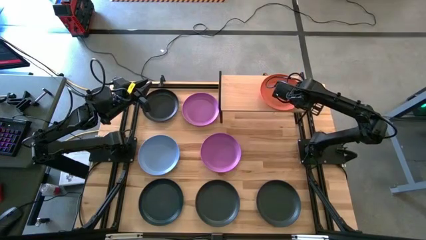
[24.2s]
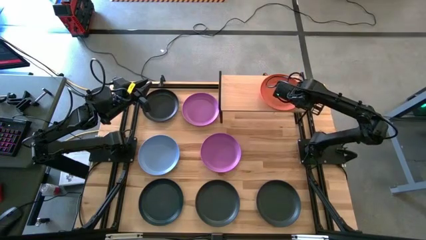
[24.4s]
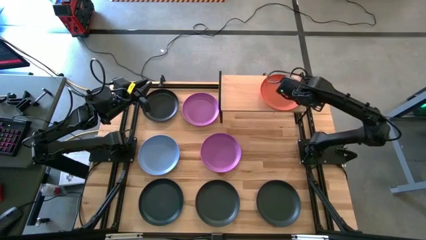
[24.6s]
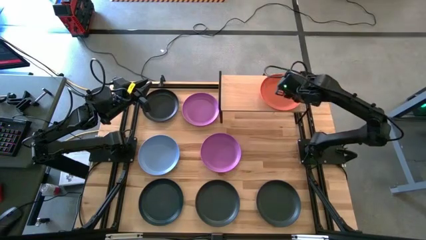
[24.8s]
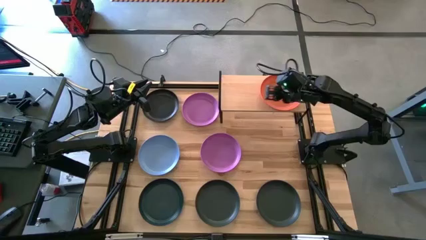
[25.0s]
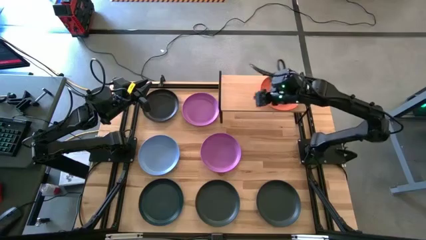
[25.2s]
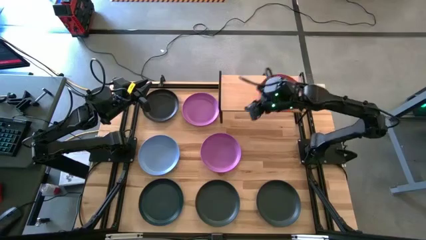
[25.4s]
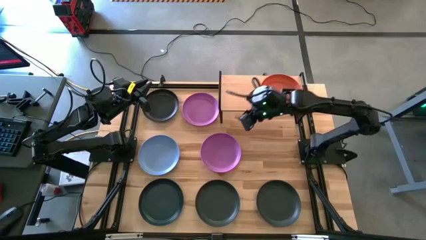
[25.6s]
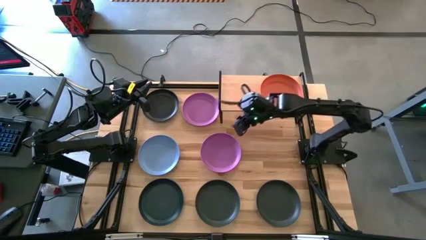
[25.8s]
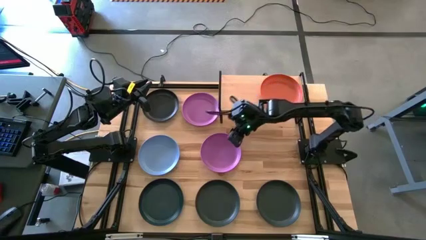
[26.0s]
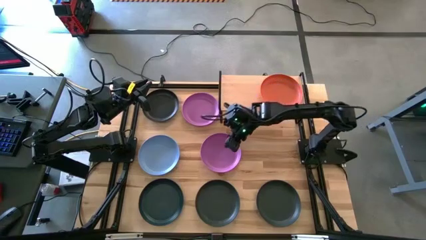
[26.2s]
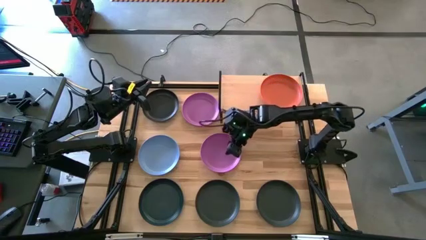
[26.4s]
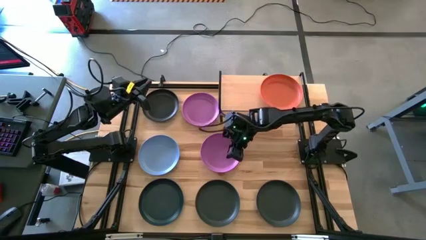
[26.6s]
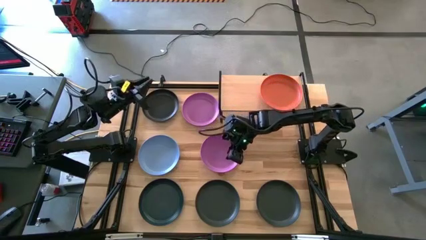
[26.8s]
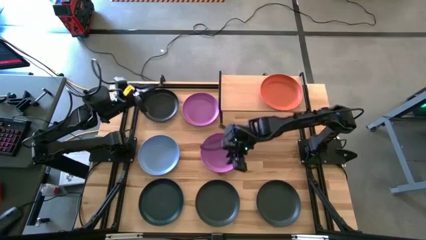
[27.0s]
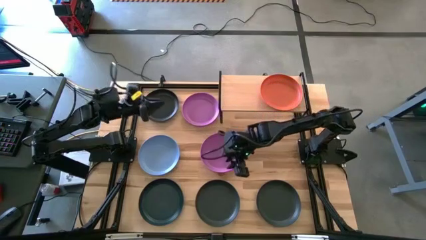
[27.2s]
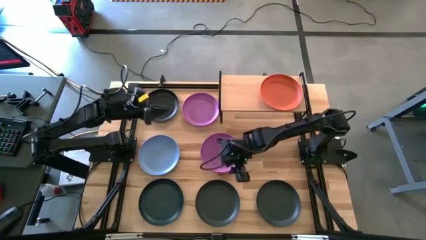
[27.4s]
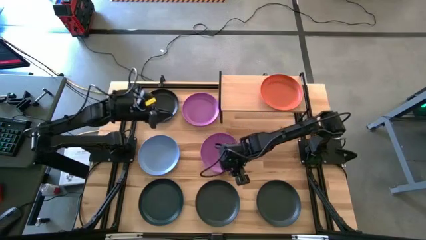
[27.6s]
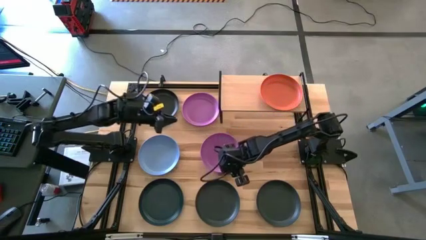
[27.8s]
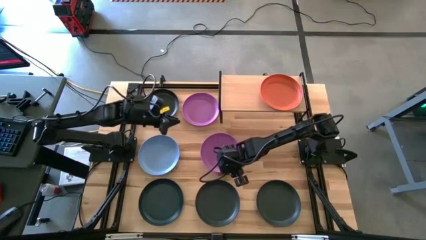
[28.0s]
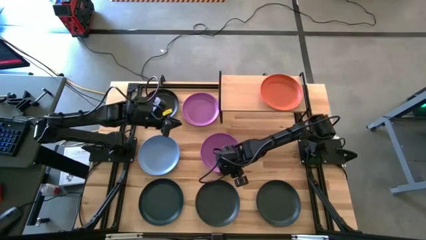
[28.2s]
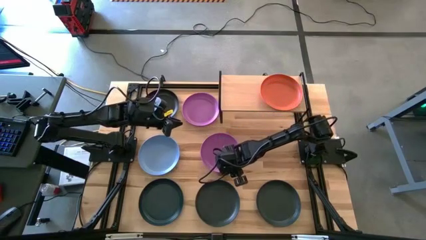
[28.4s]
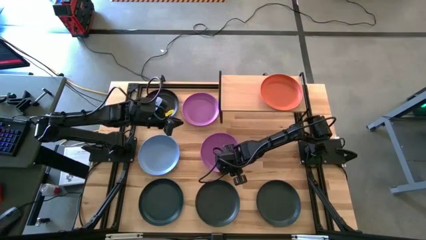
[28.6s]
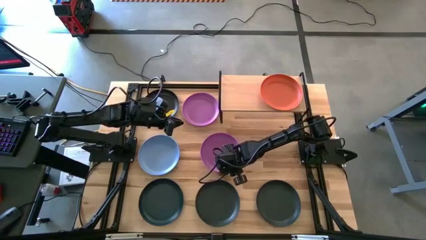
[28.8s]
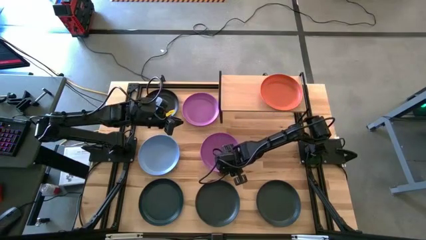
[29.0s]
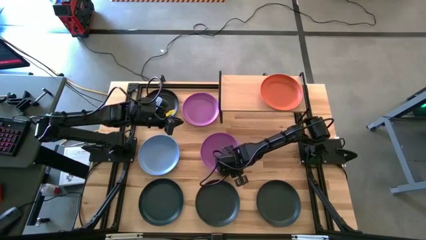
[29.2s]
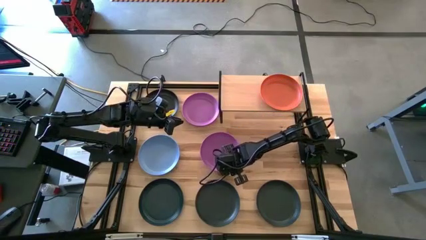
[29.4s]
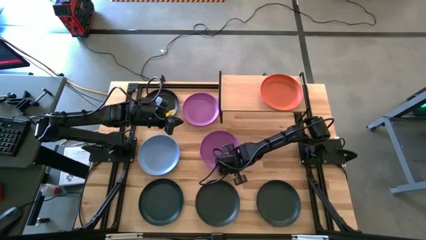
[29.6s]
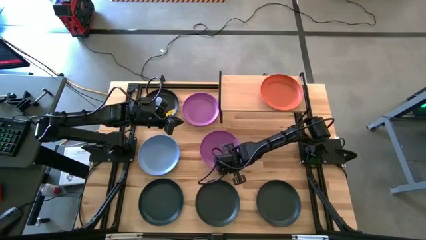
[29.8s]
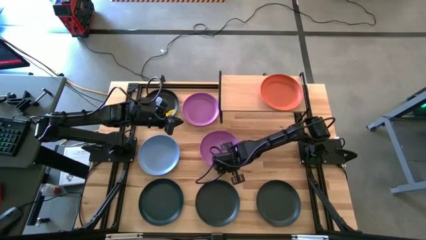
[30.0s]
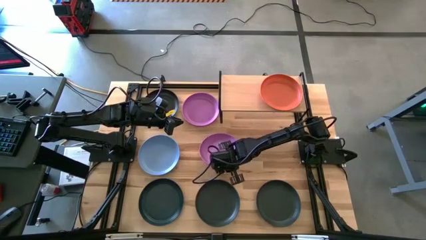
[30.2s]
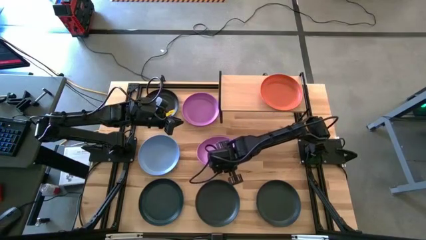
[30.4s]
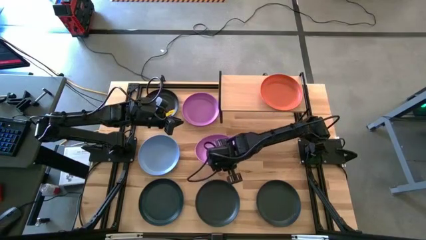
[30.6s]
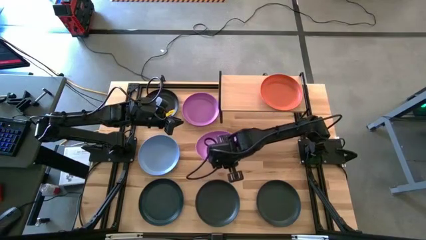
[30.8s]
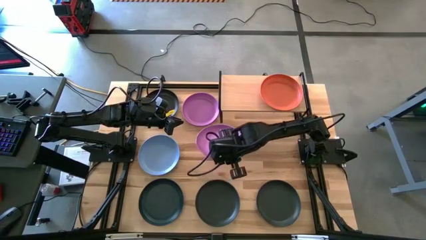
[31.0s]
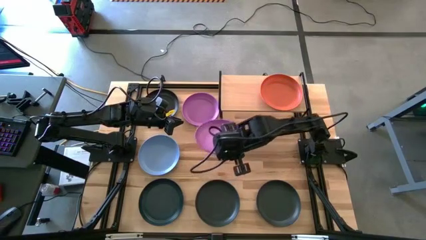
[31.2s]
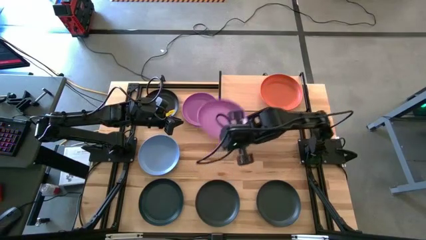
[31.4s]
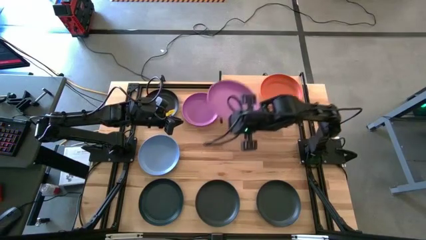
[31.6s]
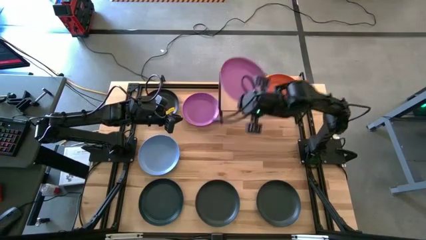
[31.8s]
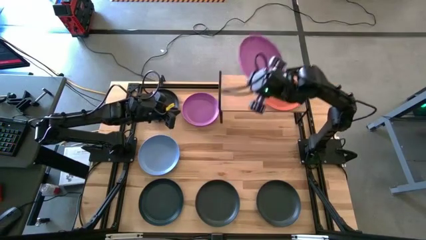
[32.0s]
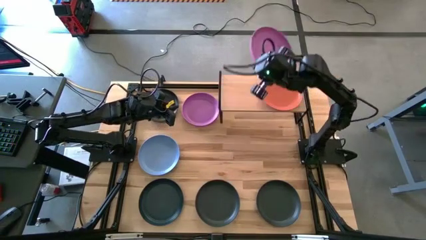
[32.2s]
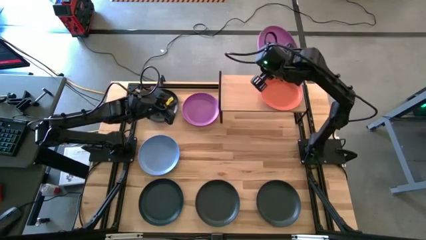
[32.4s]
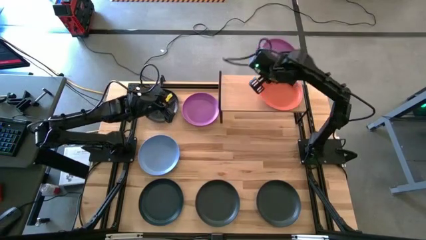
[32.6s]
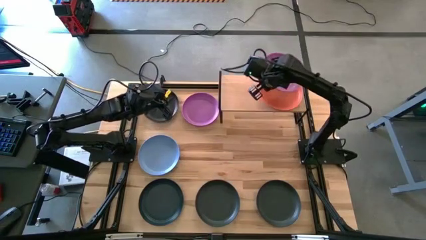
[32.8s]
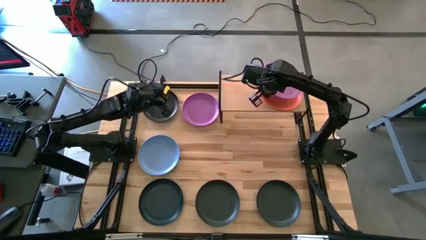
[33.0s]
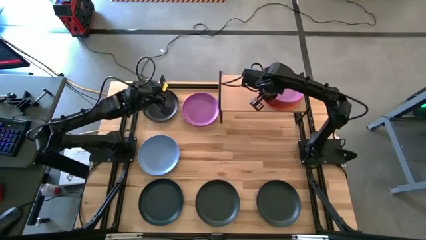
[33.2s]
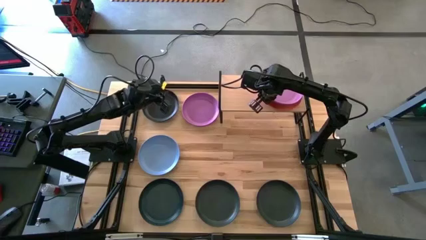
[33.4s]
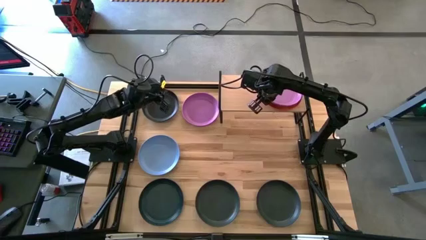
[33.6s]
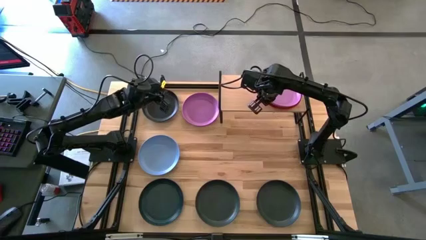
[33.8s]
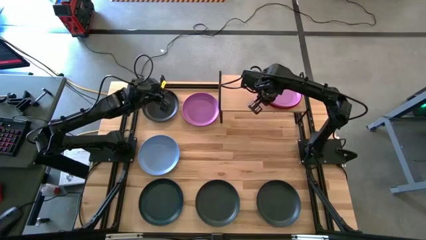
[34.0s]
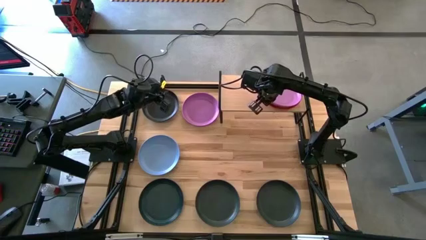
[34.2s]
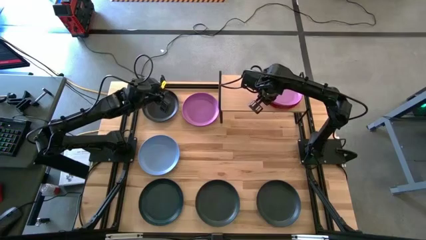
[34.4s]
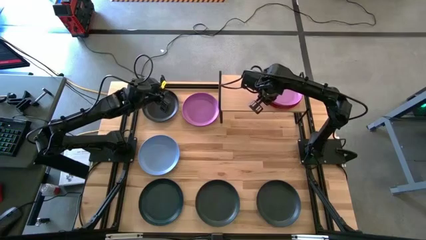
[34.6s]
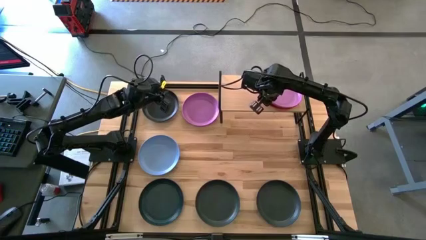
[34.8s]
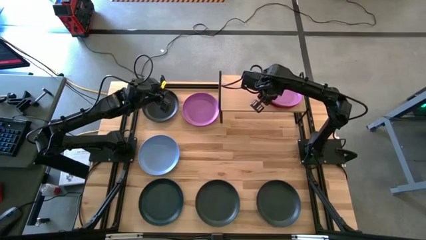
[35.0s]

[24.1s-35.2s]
Task: Place and stack plates onto a shelf
Stack the bottom violet plate on top of the orange plate on the shelf
